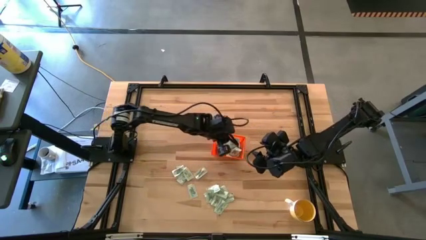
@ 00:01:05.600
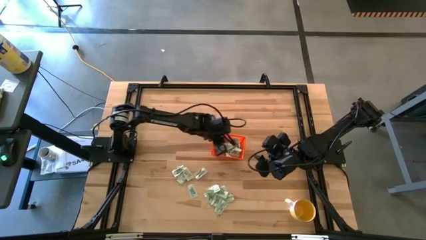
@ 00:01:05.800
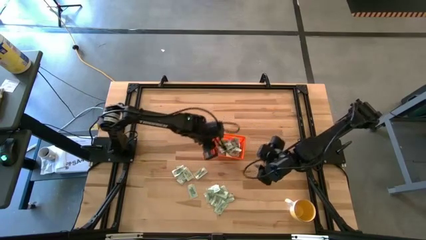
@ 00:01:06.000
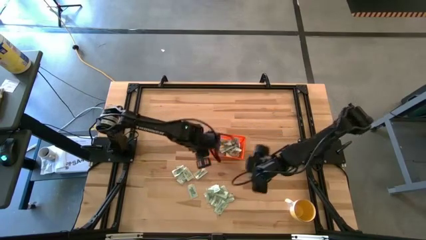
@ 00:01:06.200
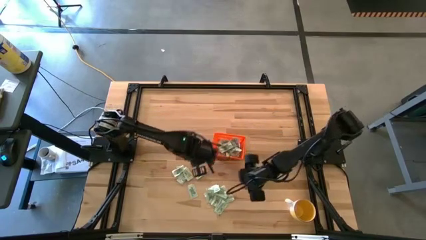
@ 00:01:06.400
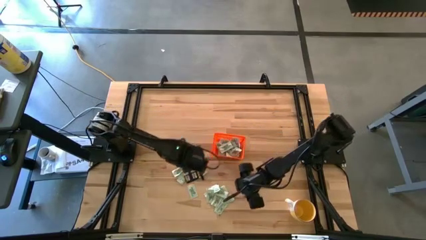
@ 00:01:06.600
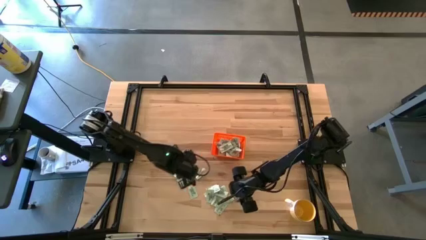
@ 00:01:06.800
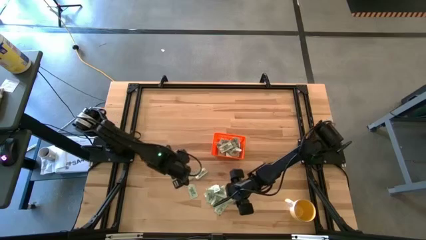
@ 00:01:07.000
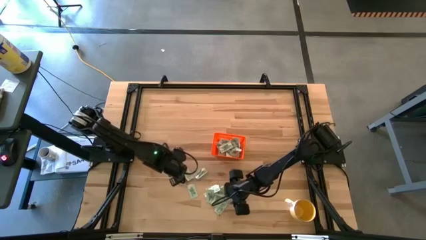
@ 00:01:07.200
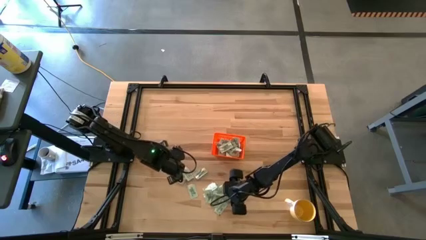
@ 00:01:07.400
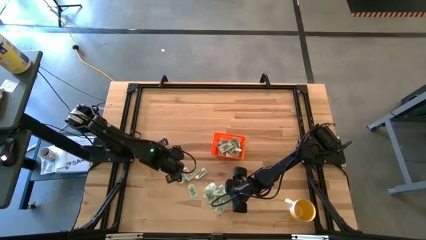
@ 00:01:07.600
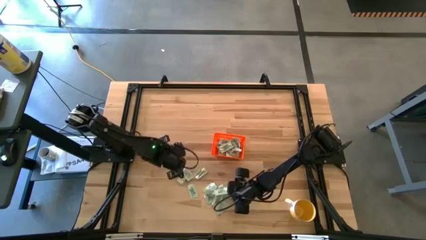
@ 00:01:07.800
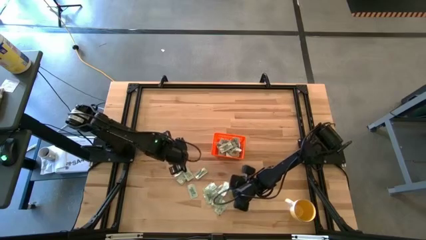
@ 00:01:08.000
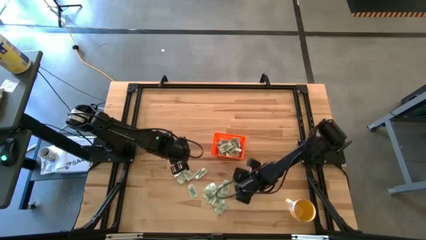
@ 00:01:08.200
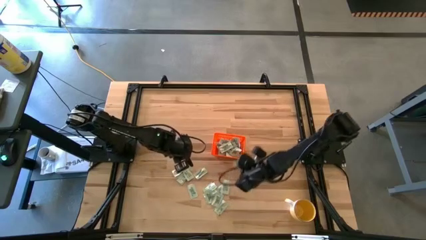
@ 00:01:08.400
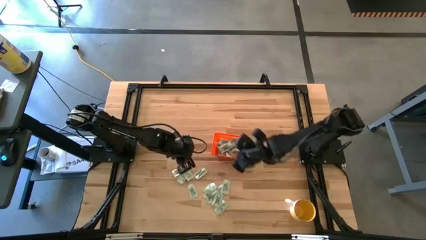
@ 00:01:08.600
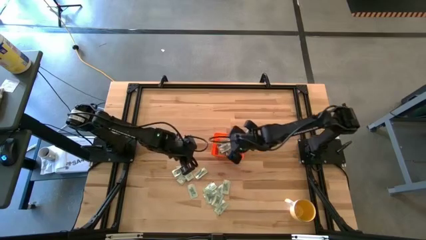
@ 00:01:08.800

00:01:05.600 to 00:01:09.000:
Task: Pick and place Stevia / Truvia into bins
Put the white stevia packet into the orange bin

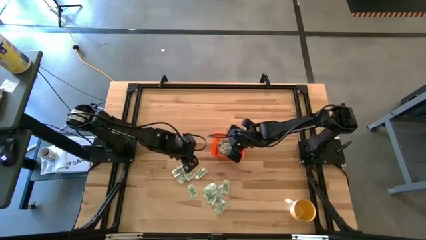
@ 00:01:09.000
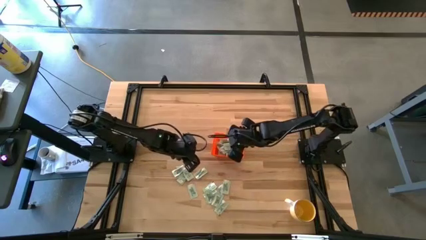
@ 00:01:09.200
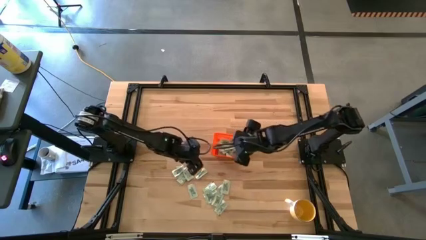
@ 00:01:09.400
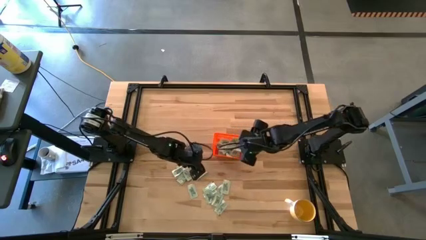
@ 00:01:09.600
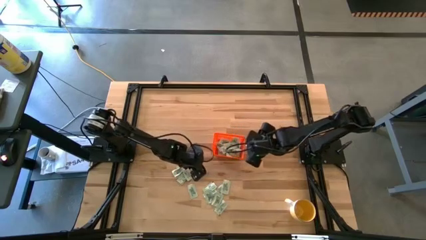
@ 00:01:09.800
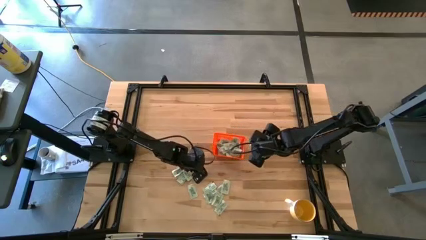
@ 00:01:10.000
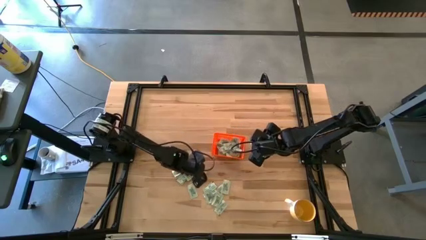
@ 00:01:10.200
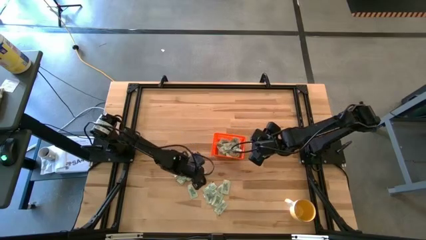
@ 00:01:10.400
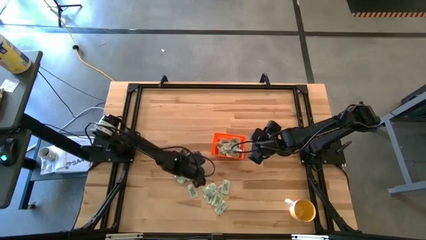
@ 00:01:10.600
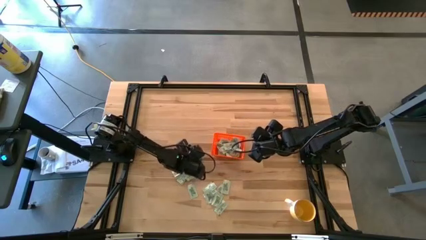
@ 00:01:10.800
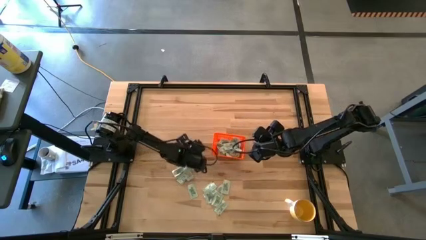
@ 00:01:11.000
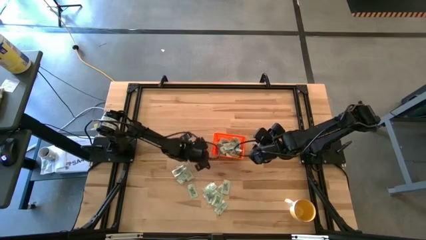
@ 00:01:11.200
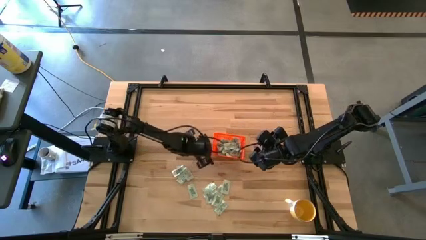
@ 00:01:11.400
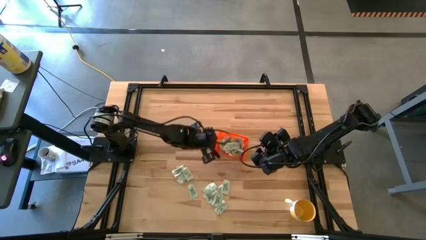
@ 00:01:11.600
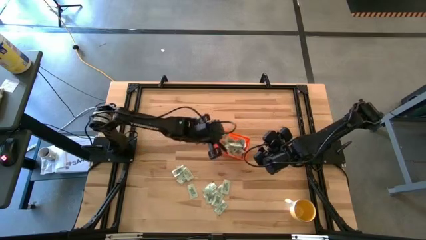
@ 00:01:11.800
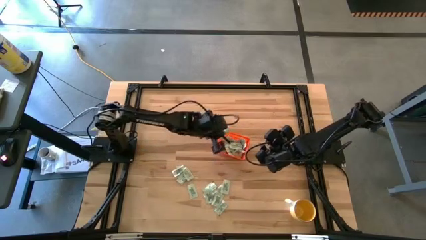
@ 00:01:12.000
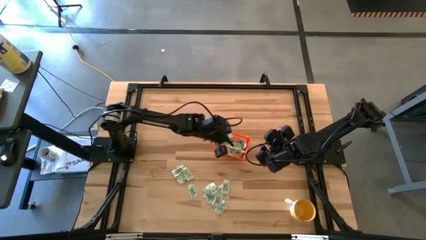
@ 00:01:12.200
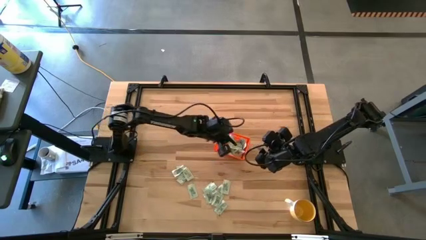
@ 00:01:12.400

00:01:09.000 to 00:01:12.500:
Put the white stevia packet into the orange bin

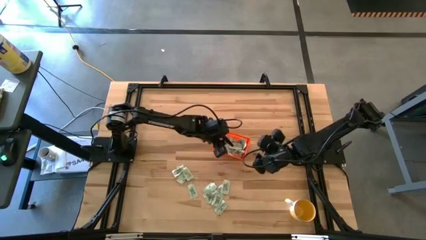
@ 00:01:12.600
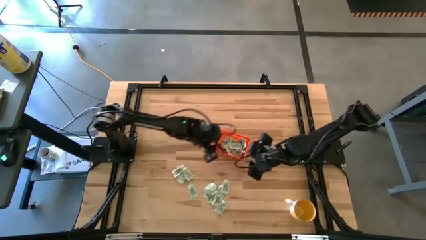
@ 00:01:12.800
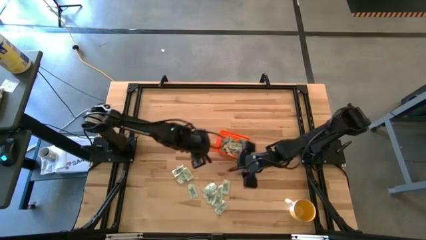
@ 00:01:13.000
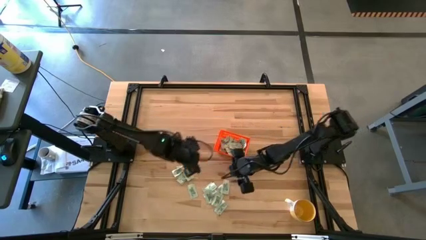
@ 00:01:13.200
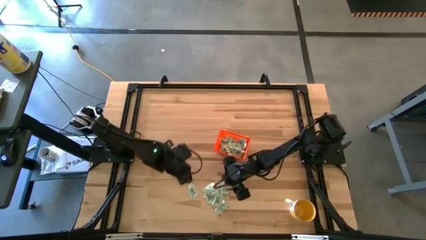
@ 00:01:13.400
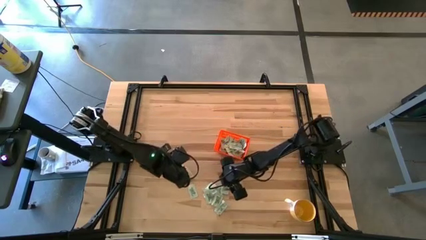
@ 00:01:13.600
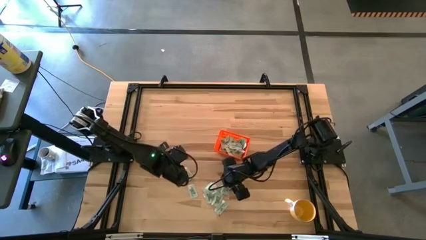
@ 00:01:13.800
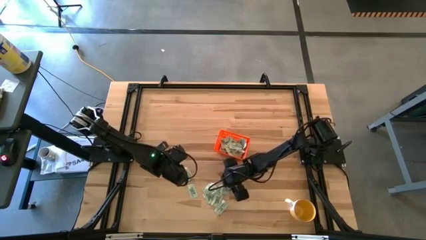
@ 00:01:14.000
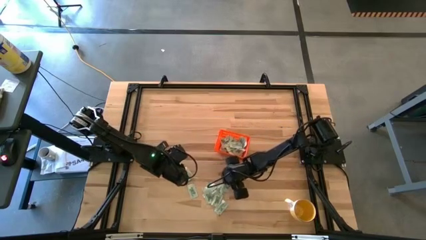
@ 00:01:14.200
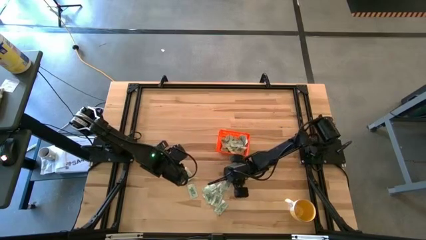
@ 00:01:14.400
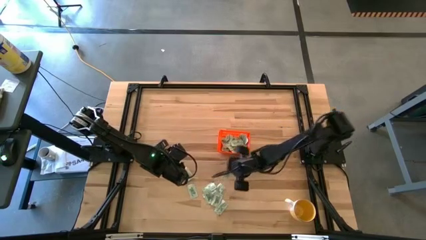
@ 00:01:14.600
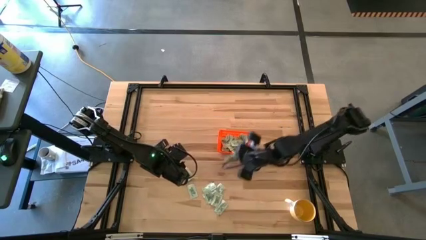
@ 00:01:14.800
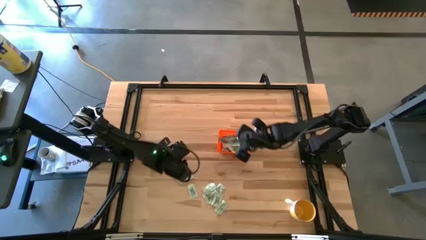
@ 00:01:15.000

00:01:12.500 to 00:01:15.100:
Put the white stevia packet into the orange bin

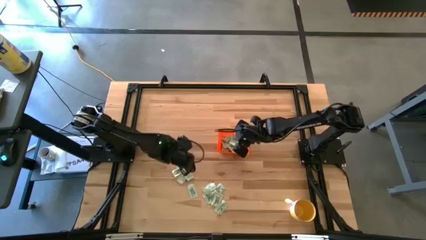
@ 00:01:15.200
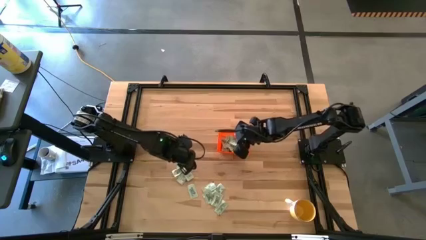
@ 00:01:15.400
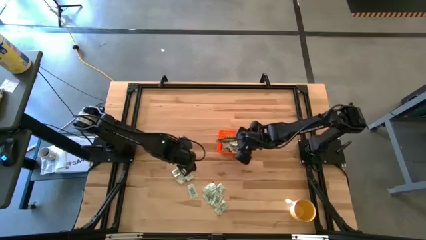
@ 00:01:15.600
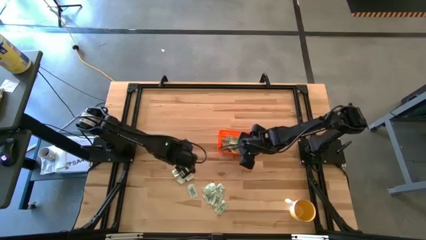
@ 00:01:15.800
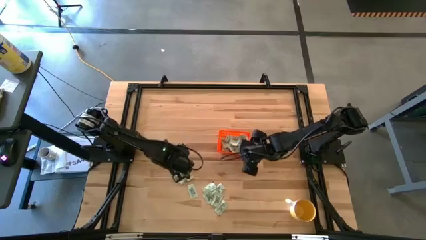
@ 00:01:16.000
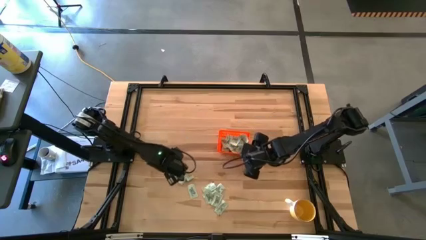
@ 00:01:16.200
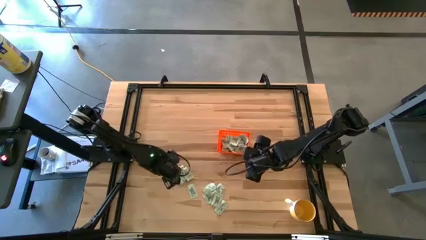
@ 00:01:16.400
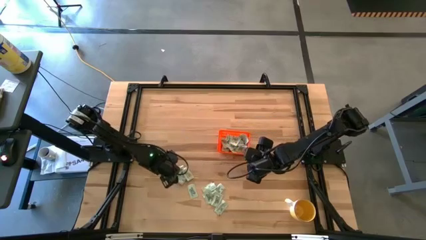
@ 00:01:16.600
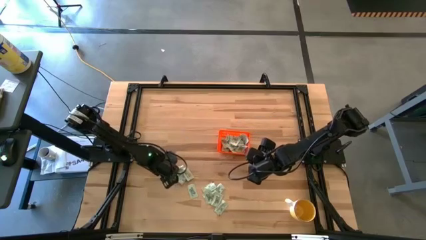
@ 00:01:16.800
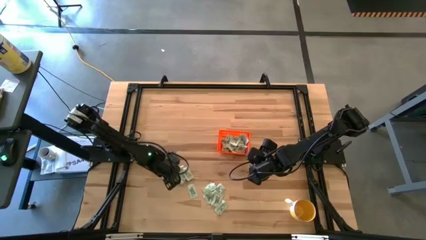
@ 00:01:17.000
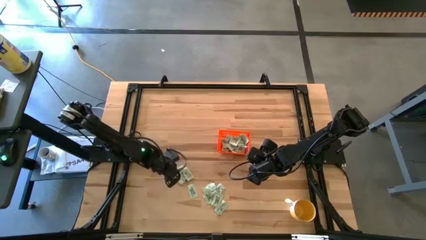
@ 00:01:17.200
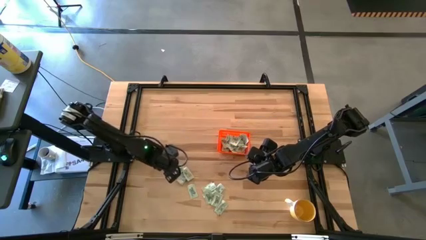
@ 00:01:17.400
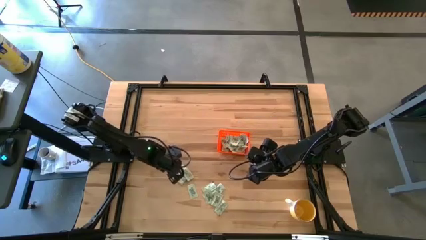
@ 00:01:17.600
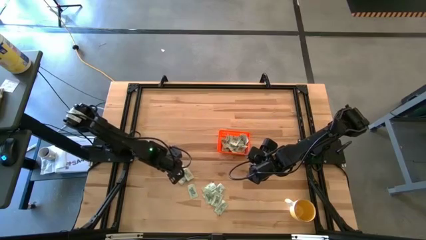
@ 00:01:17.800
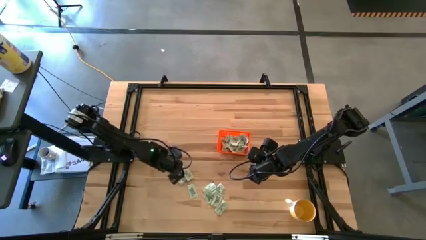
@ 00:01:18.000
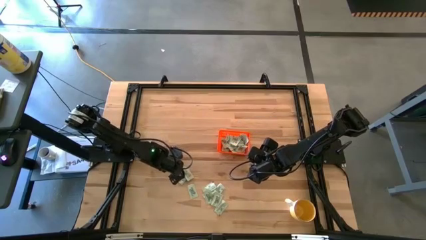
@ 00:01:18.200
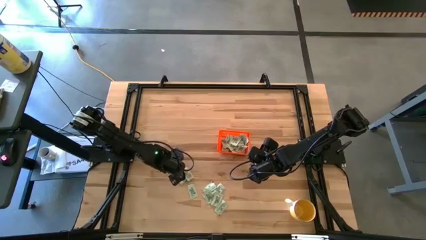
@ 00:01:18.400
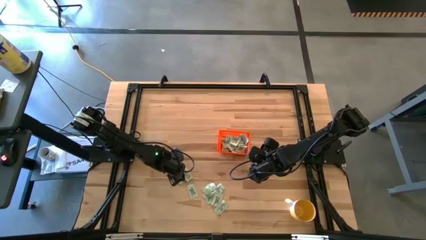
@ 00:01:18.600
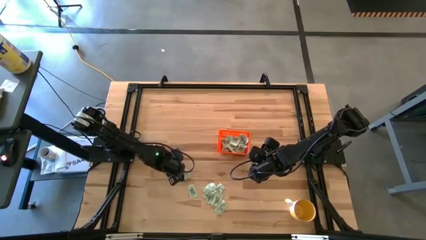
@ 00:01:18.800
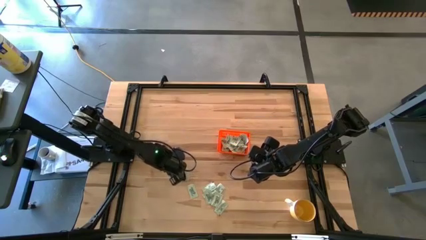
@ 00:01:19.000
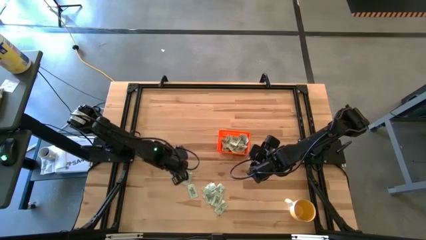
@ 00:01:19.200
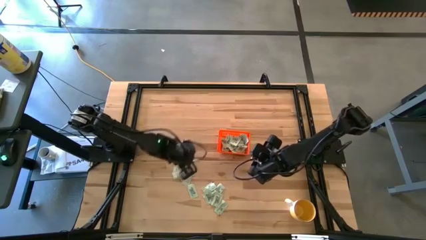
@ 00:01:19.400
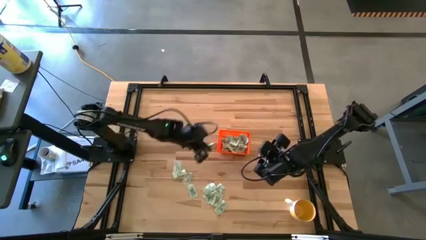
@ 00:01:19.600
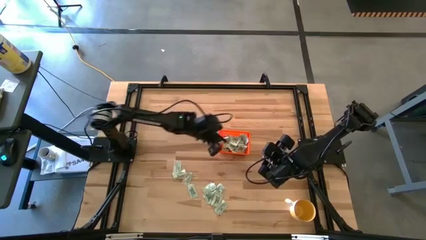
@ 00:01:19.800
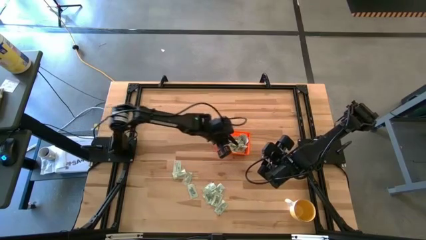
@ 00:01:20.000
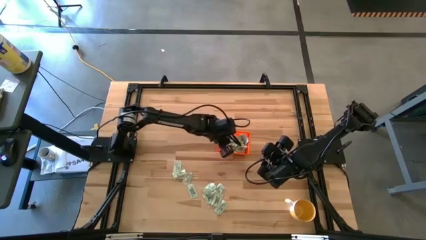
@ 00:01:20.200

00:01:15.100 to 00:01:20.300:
Put the white stevia packet into the orange bin

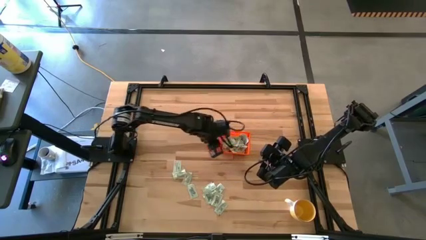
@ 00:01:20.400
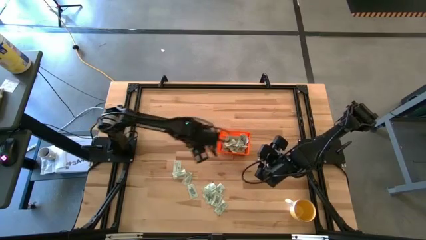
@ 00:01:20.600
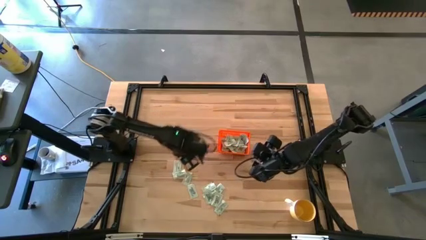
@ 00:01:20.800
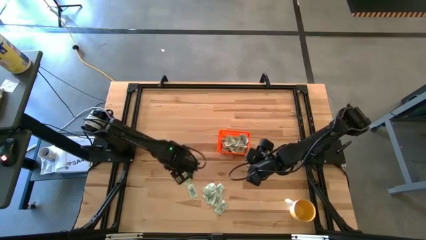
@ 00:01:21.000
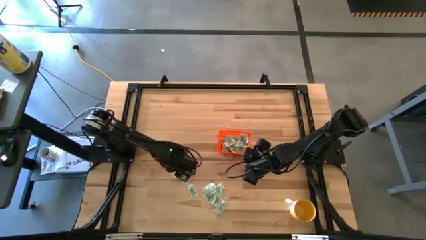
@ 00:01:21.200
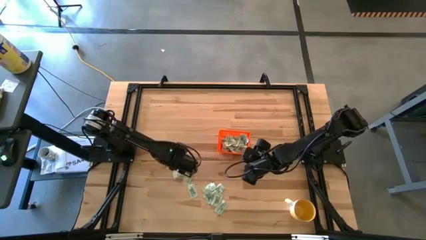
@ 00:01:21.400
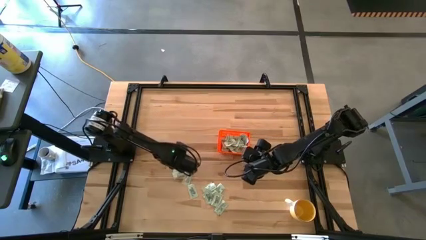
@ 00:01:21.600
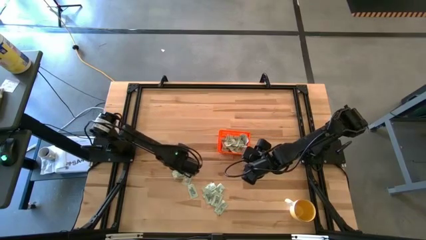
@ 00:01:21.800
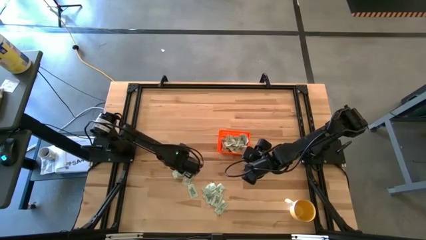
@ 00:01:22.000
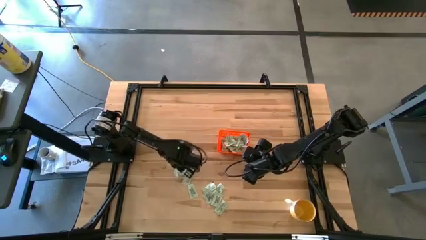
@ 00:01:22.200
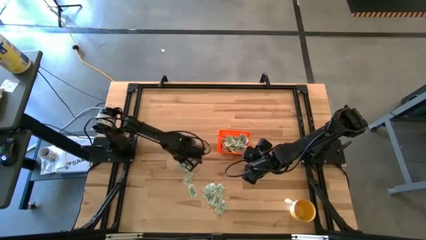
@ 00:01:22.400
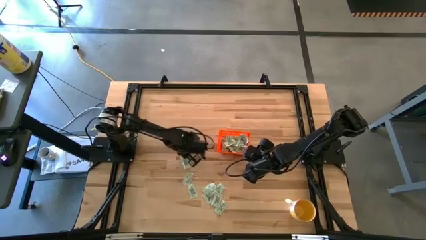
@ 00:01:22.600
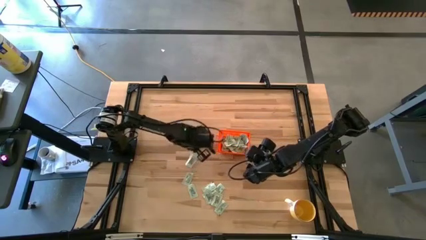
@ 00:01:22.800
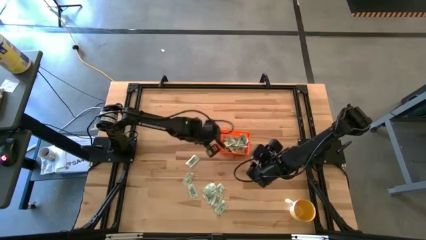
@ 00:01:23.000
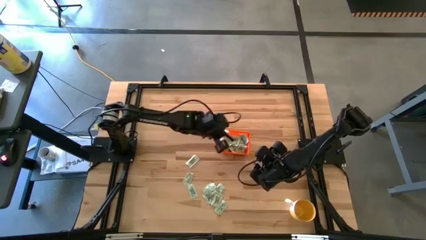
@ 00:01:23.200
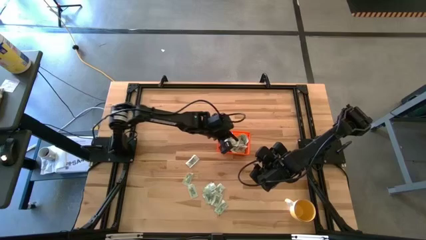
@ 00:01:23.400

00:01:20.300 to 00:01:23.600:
Put the white stevia packet into the orange bin
